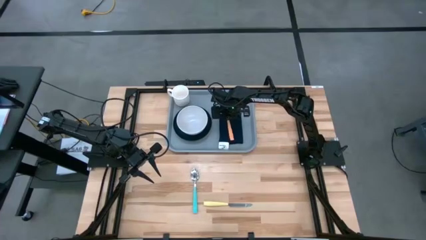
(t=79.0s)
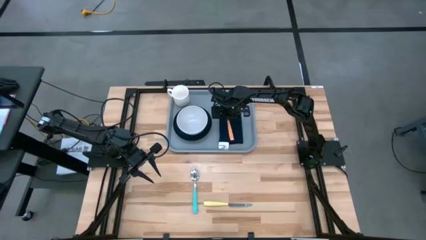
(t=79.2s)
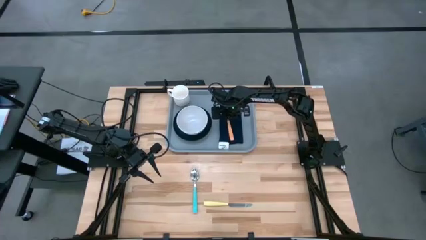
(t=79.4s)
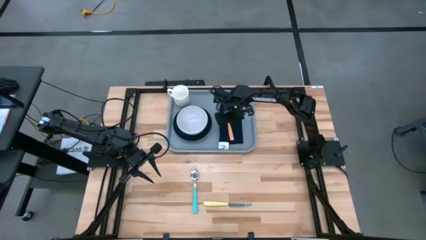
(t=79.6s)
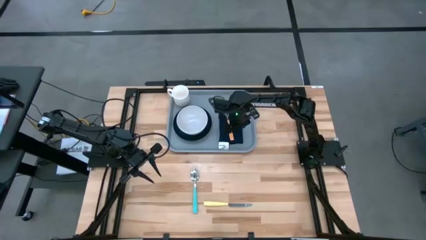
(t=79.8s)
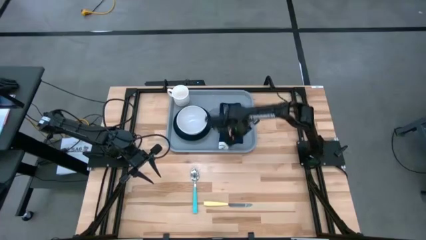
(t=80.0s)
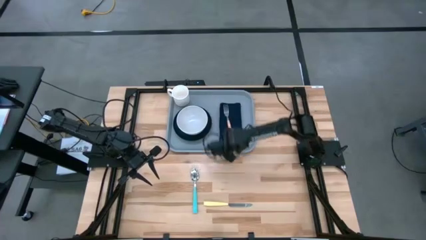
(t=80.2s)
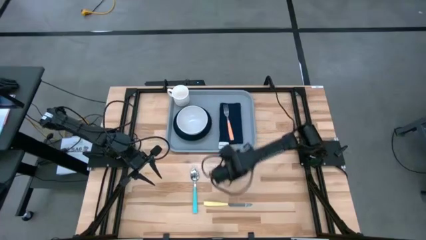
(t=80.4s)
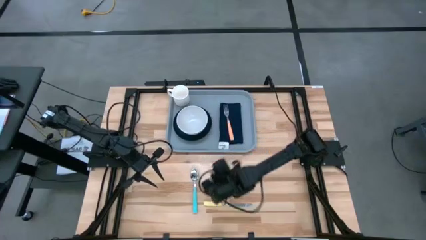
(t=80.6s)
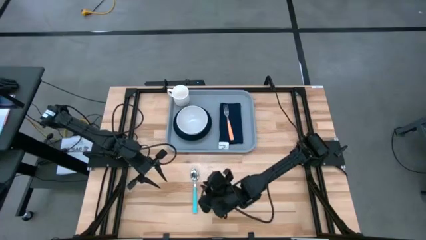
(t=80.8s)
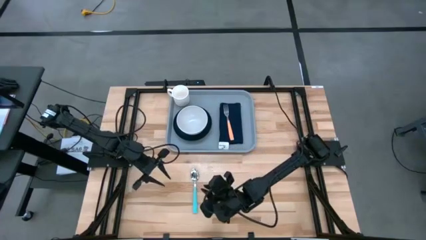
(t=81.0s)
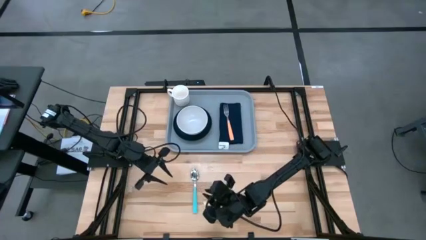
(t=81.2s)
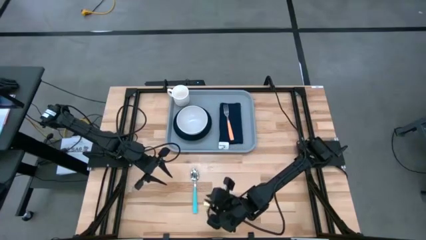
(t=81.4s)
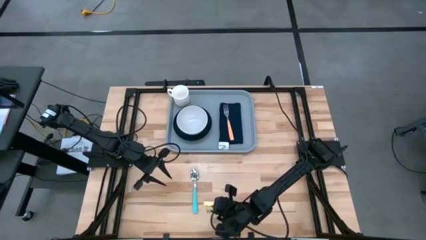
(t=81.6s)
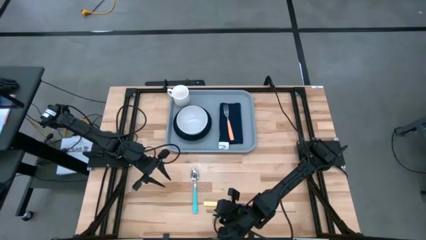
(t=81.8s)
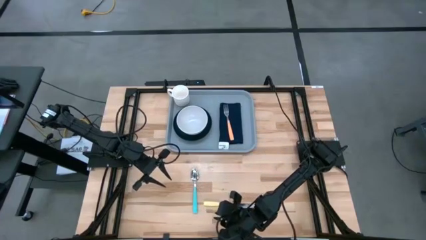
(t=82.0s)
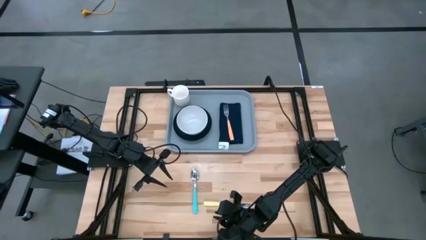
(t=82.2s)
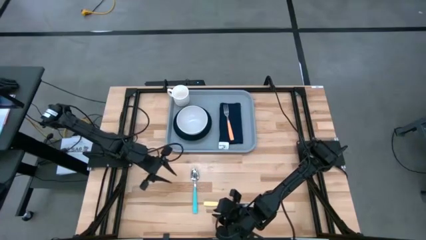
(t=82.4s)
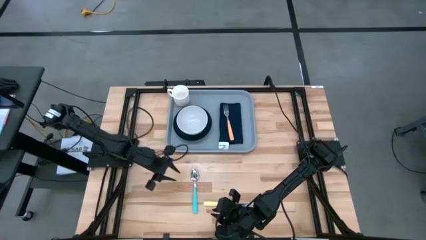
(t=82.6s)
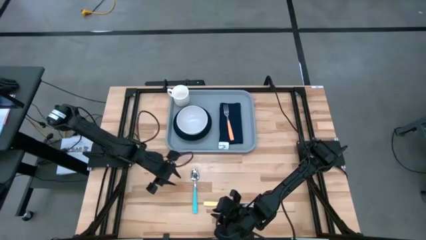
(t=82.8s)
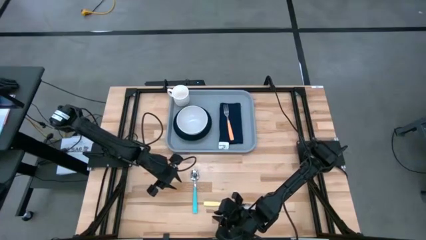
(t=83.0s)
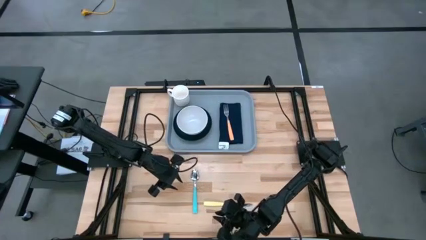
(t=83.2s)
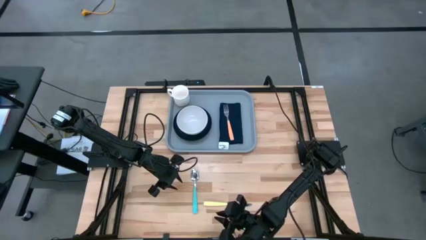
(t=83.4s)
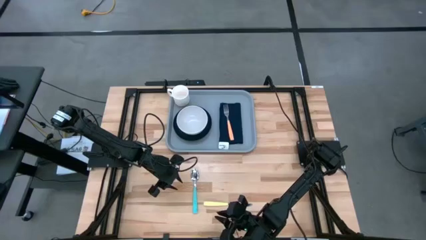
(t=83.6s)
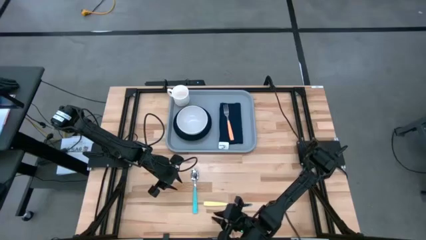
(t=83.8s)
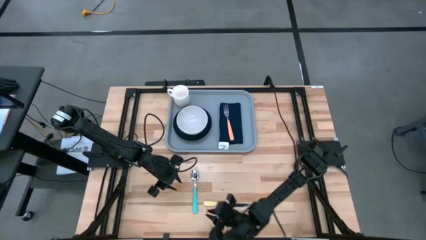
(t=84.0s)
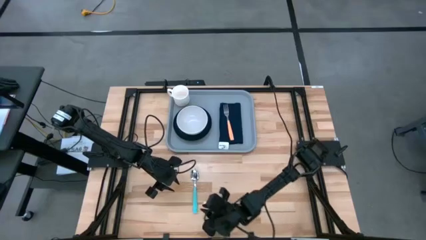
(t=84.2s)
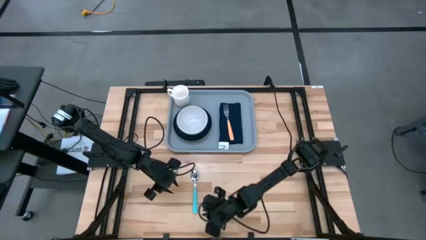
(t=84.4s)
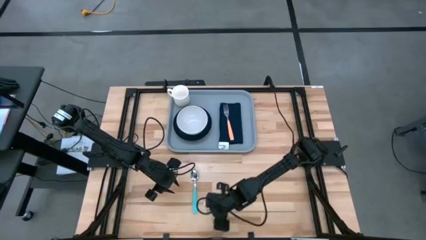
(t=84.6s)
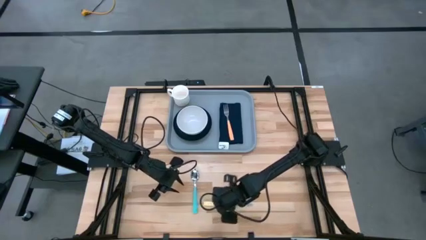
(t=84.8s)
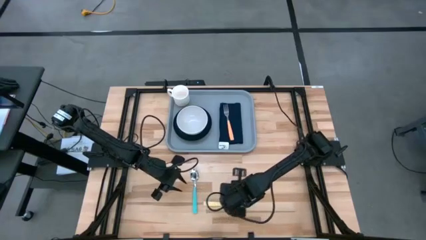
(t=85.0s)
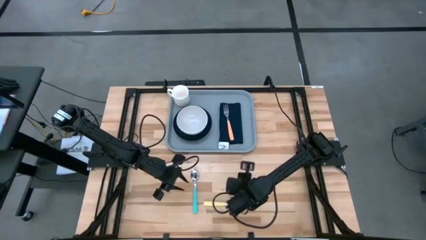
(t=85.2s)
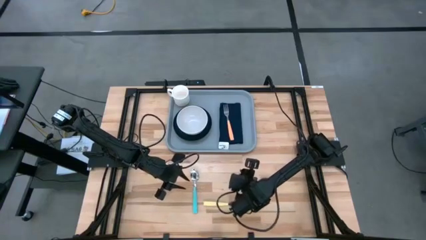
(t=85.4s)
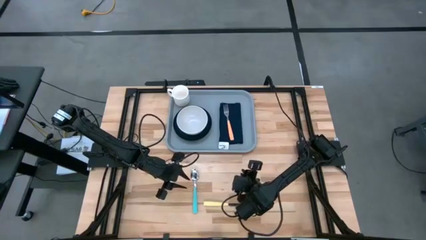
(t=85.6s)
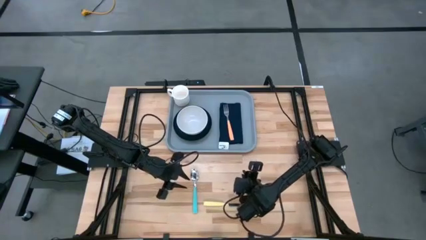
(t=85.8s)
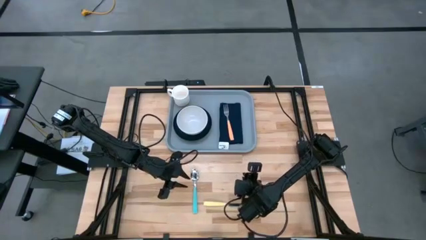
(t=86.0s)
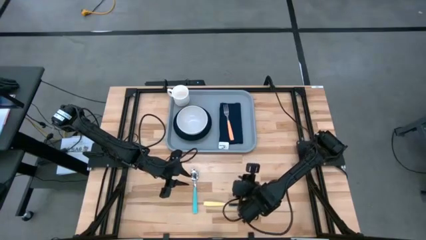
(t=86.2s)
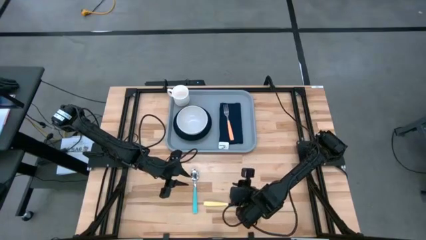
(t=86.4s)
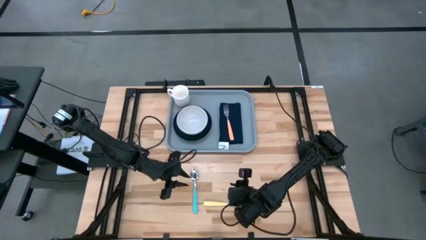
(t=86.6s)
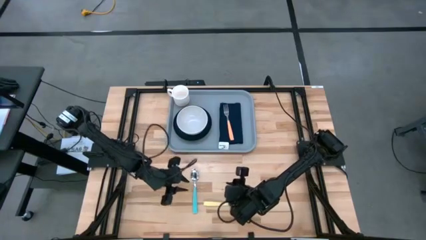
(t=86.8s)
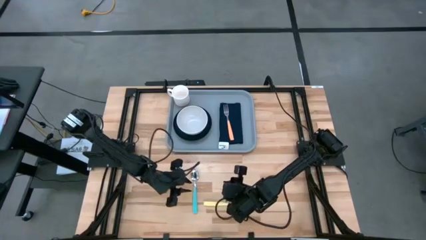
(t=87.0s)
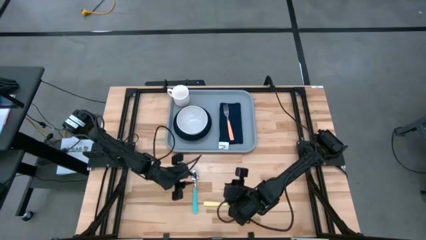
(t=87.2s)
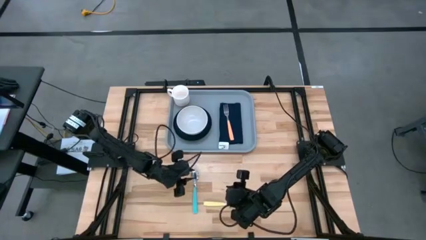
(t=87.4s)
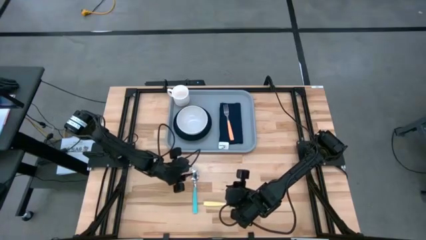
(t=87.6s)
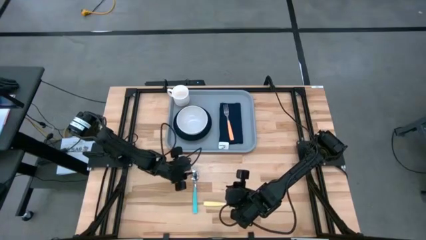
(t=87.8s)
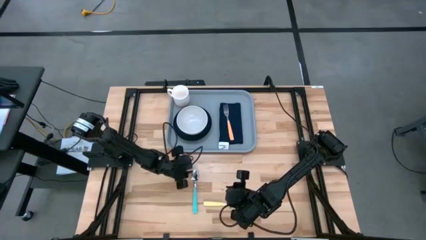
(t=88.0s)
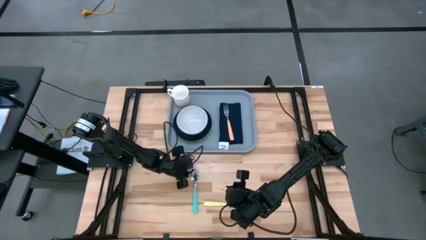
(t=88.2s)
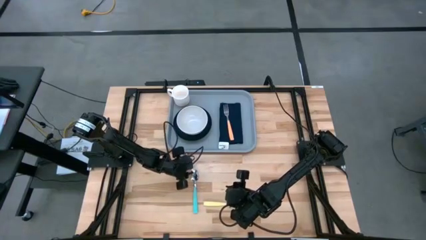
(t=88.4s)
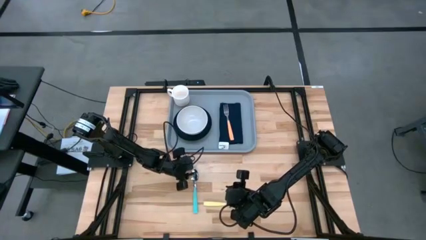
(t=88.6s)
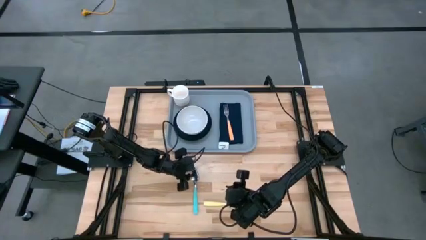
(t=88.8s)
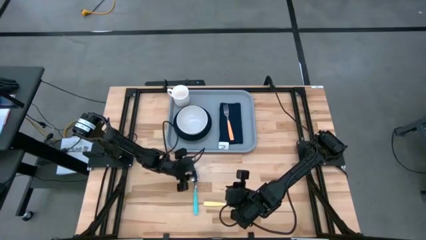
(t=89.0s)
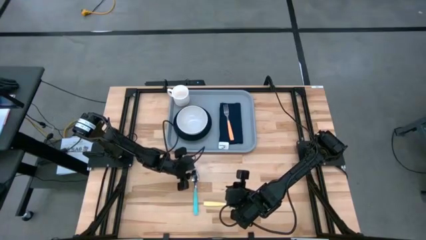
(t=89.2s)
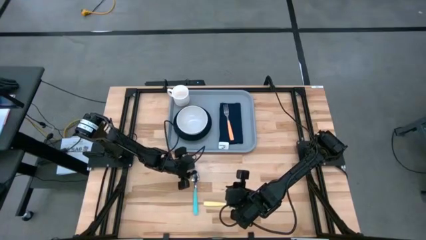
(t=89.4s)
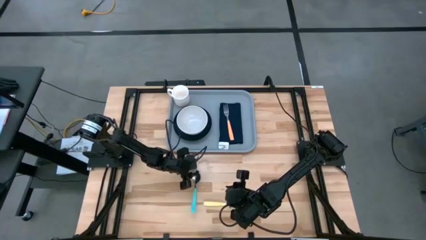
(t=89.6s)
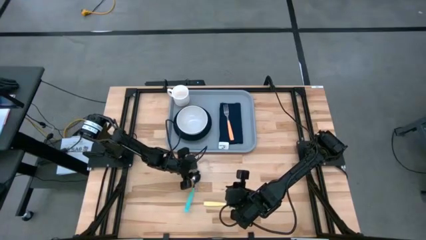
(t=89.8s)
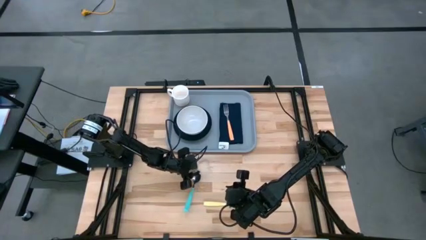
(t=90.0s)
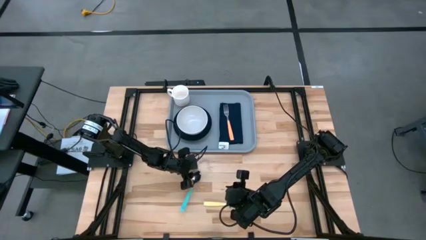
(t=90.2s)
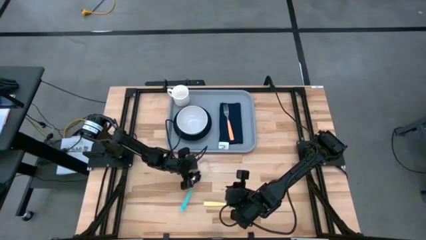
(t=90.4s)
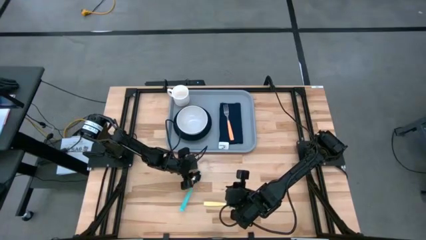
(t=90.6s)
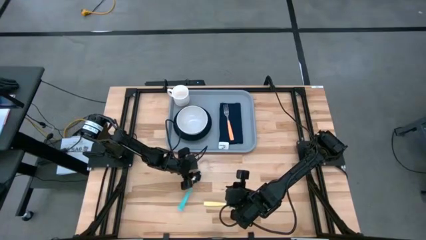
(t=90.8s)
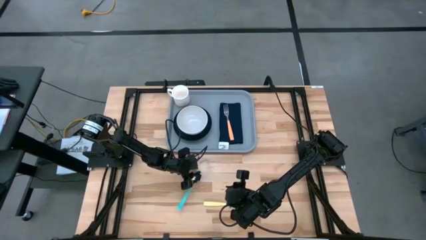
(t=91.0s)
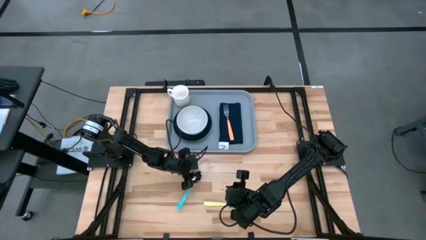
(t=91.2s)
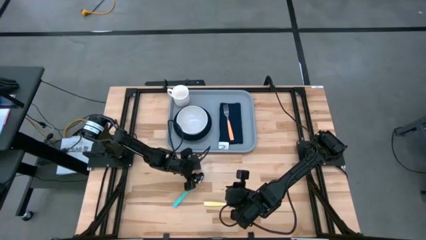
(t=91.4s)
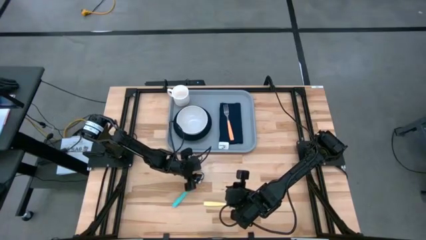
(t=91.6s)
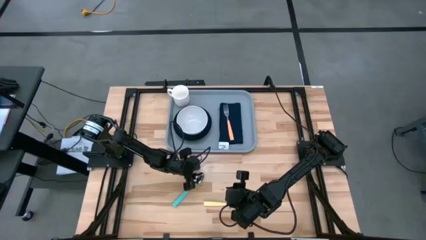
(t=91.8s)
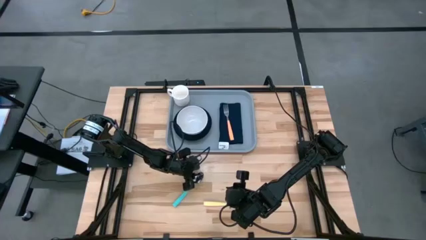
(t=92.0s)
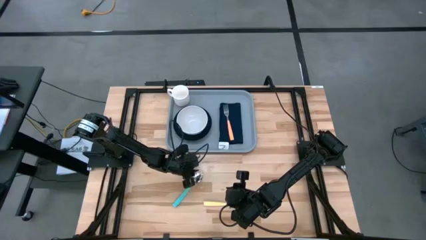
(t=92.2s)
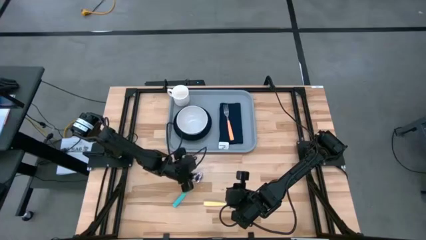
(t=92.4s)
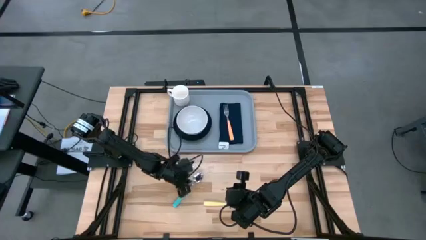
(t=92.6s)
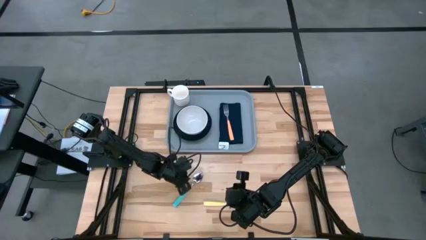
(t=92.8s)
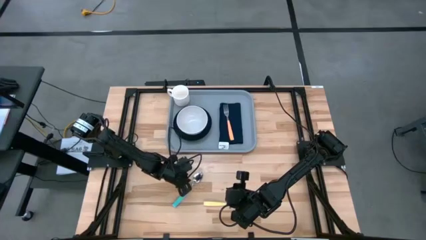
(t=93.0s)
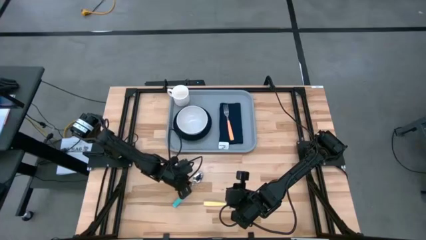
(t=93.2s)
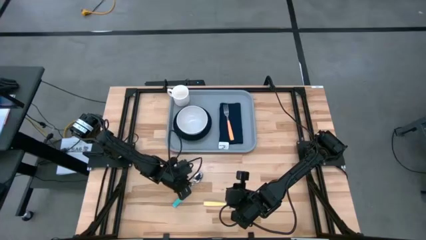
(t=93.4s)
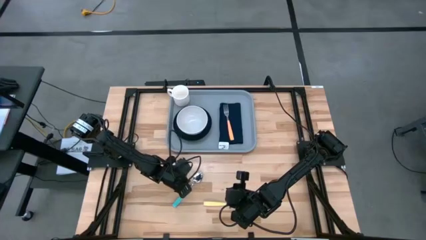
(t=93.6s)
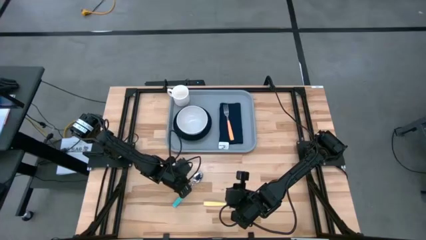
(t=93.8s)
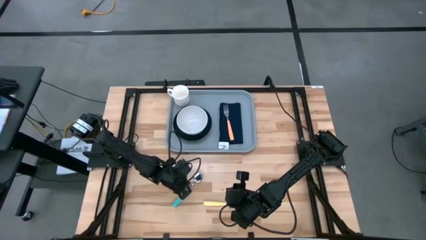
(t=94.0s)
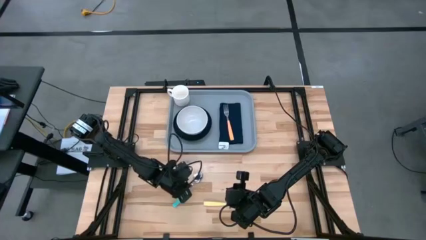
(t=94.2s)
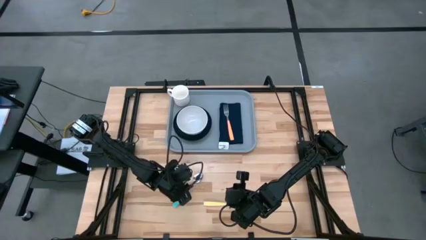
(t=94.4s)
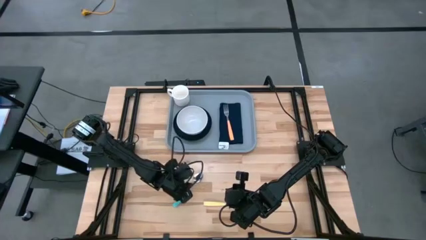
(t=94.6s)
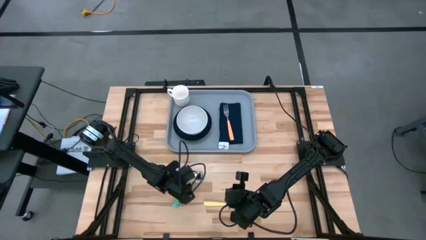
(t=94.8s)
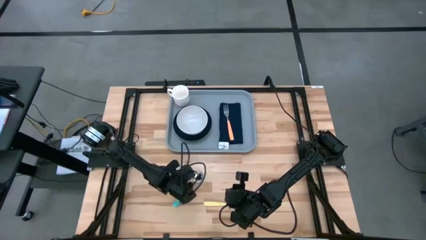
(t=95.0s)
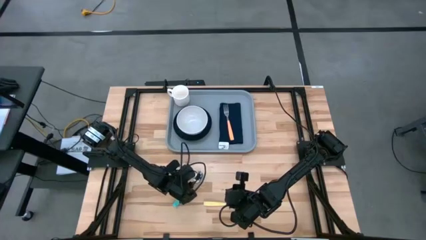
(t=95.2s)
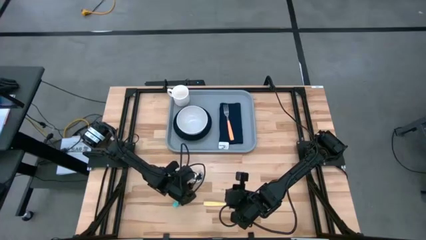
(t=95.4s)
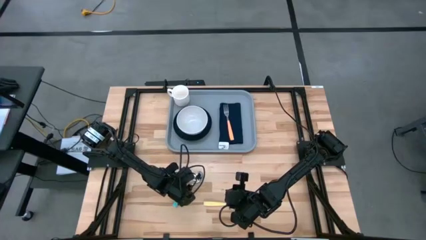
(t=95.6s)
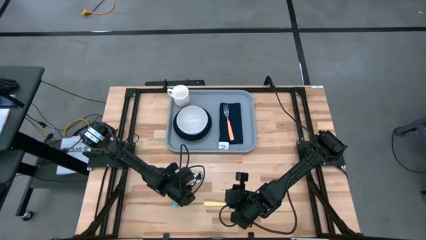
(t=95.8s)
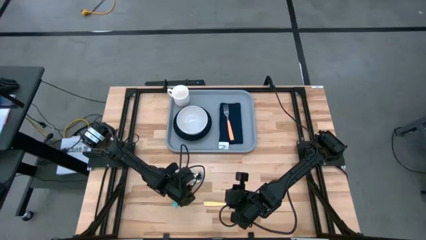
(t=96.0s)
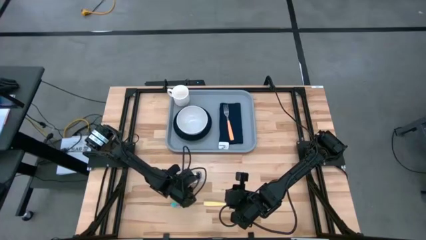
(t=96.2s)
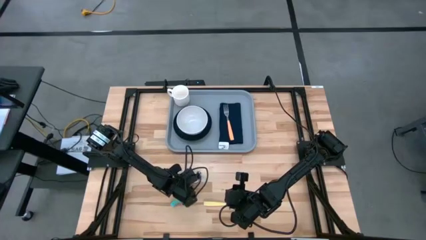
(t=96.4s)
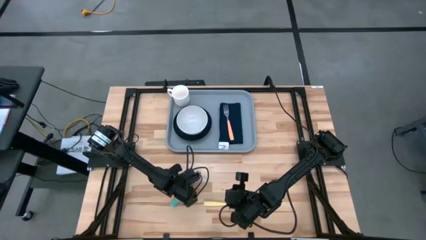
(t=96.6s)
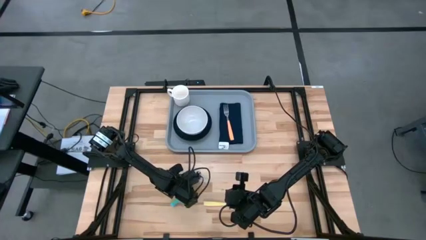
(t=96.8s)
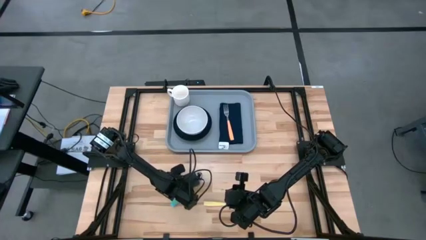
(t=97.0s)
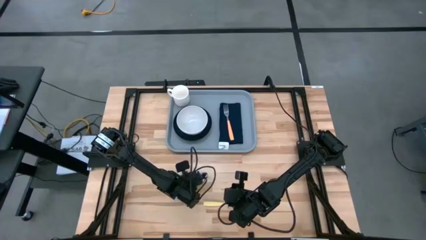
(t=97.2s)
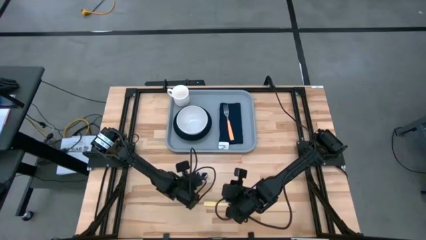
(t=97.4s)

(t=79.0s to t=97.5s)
Task: Set up tray
Put the blue spoon on the blue napkin to the left of the orange fork
